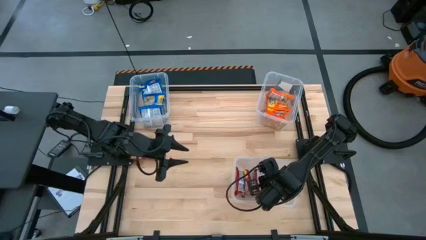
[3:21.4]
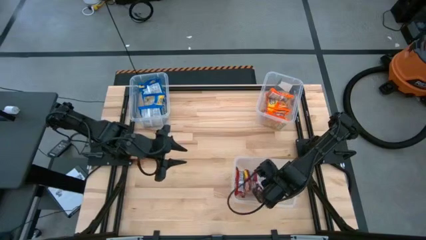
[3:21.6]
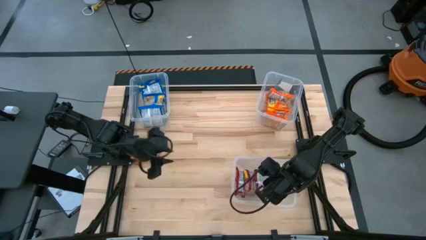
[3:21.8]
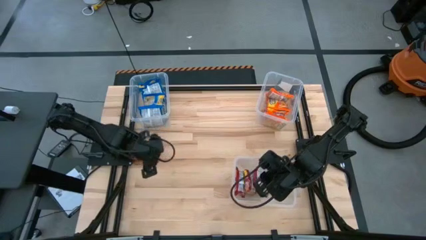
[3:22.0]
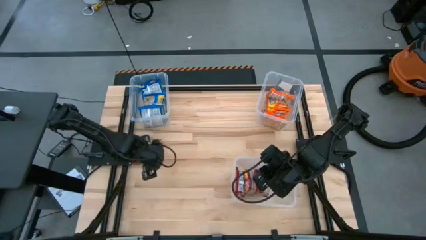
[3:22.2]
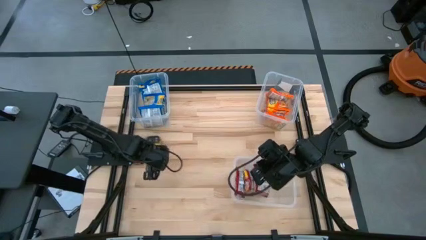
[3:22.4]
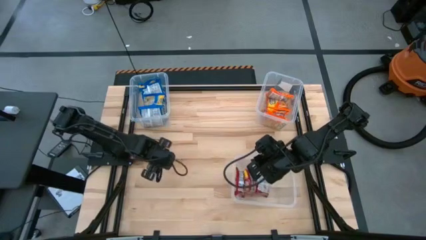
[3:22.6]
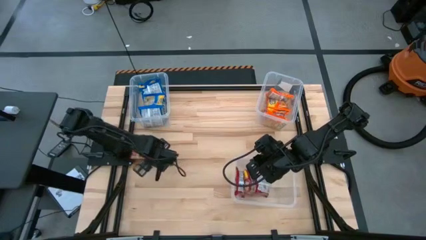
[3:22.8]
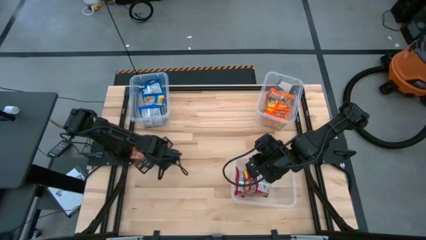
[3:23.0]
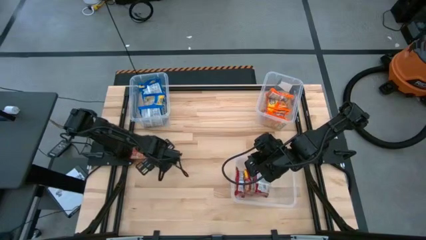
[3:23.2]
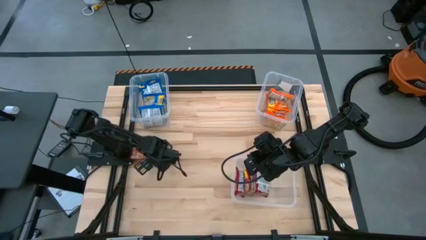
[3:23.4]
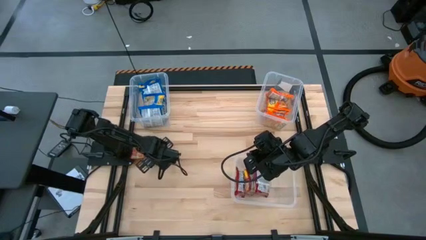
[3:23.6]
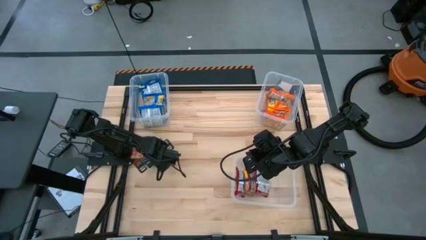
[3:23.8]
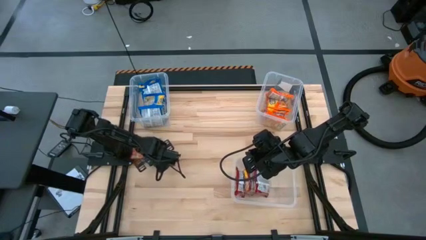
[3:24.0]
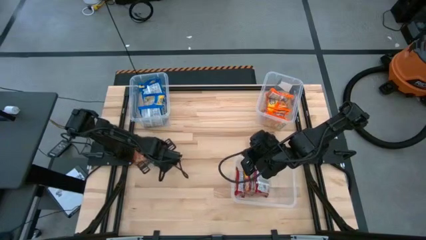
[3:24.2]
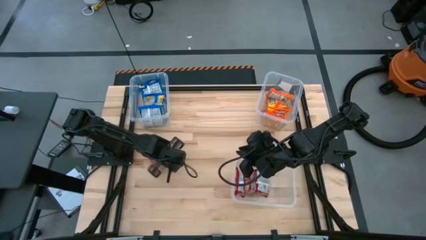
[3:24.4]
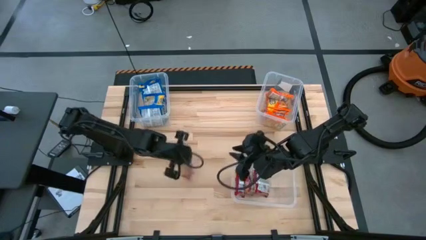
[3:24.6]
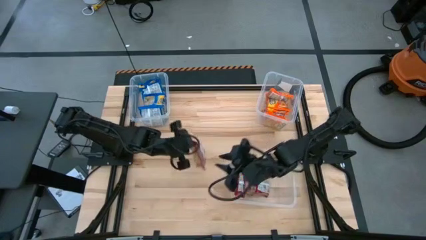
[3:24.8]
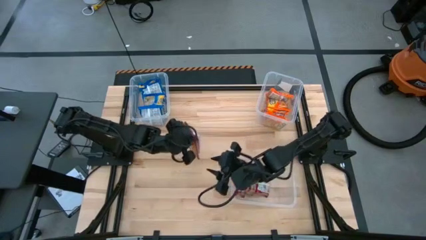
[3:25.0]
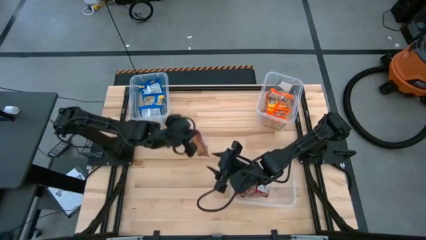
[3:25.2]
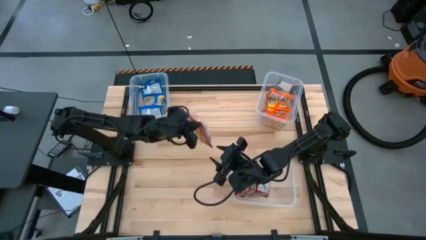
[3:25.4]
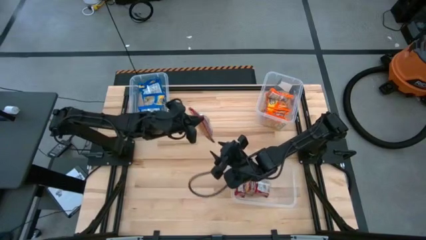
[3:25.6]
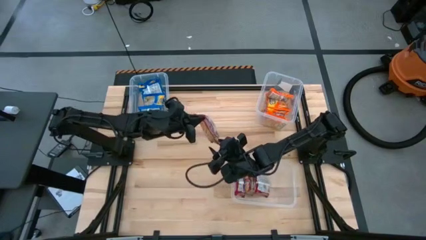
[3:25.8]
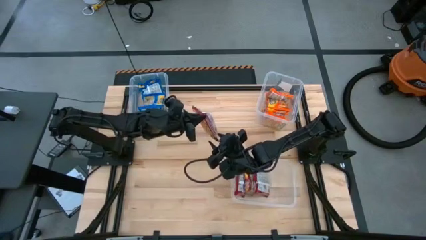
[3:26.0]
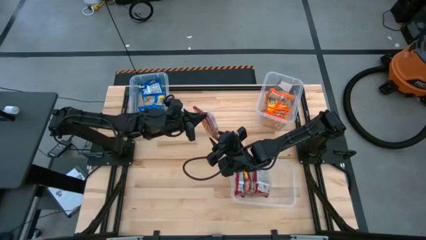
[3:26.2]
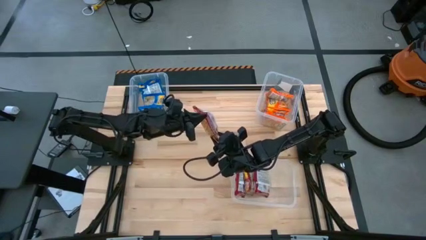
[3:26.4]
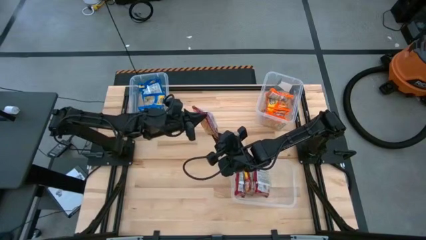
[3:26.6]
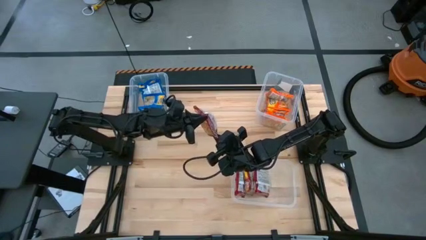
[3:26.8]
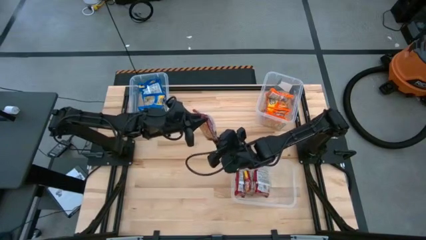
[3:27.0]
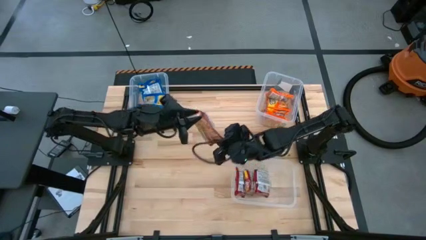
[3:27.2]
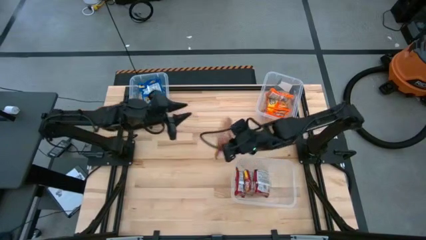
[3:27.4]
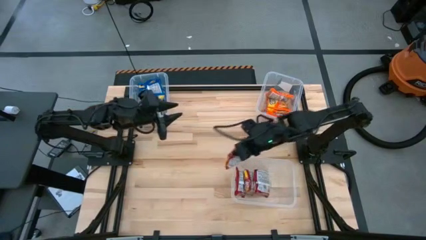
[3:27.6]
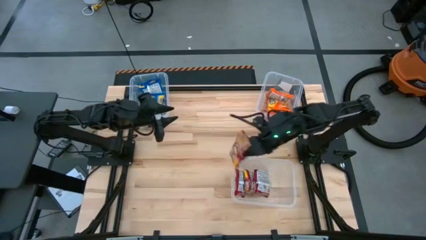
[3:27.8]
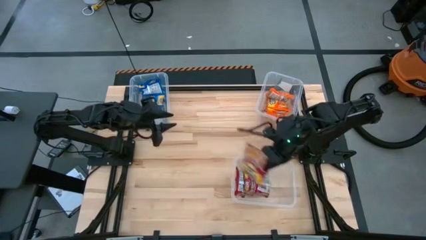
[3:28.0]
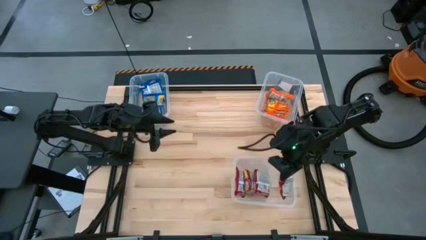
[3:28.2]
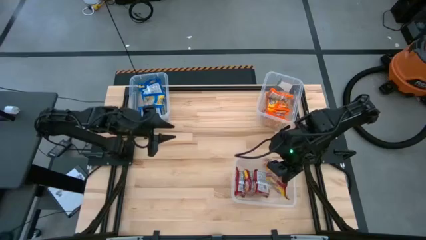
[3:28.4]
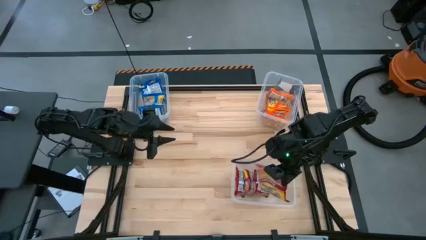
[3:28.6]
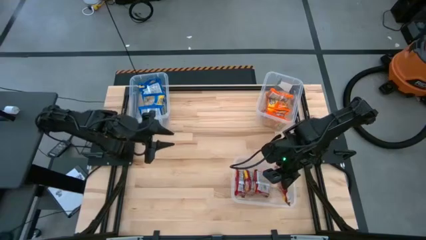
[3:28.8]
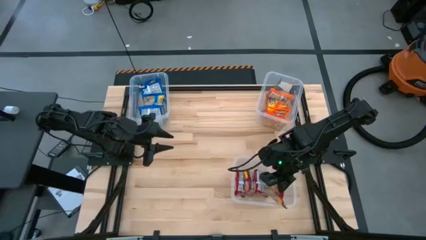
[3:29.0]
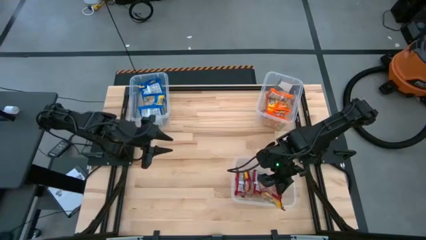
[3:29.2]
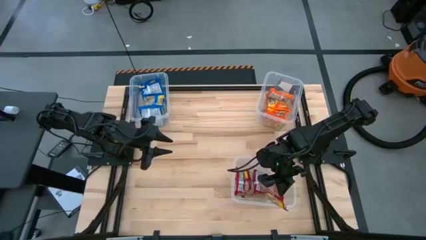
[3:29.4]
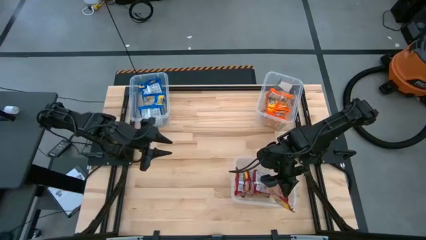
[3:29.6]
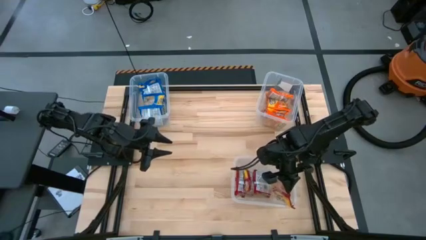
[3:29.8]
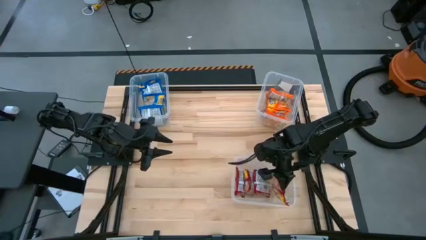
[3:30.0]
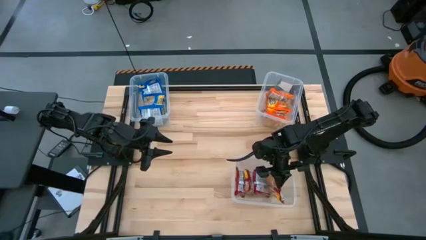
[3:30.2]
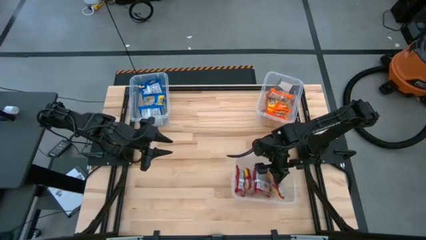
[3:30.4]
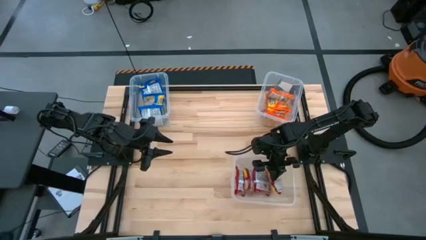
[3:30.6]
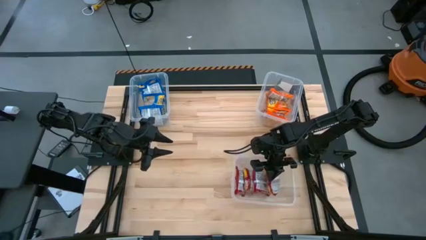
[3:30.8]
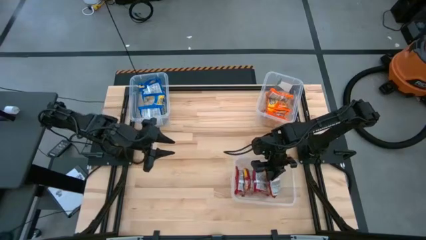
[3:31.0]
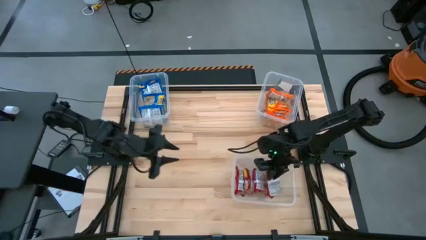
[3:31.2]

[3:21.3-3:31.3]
Task: Sort Maruchan noodles
Put the red noodle pack into the bottom transparent bin

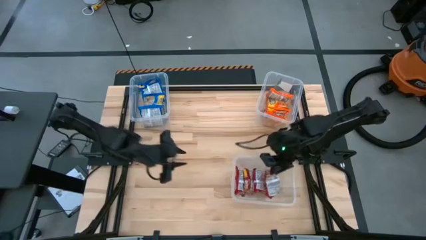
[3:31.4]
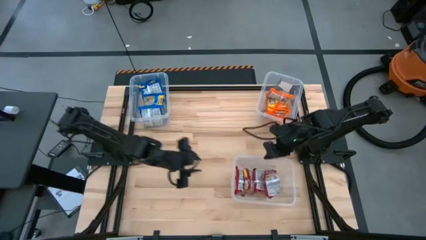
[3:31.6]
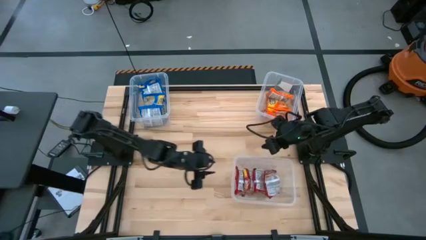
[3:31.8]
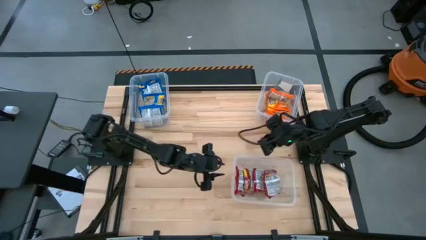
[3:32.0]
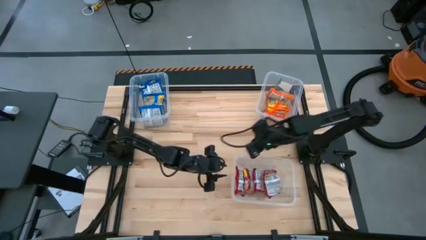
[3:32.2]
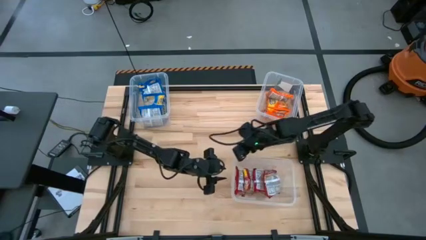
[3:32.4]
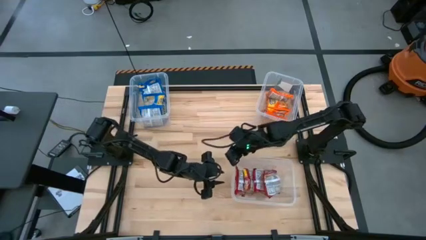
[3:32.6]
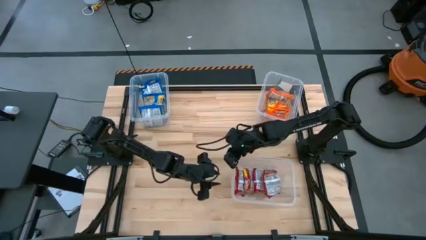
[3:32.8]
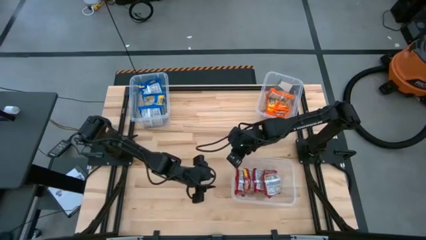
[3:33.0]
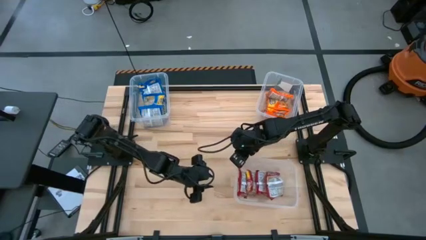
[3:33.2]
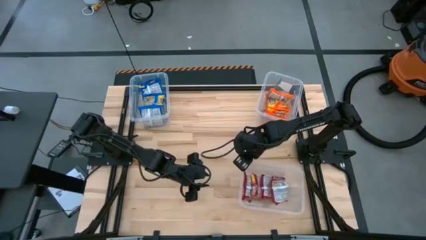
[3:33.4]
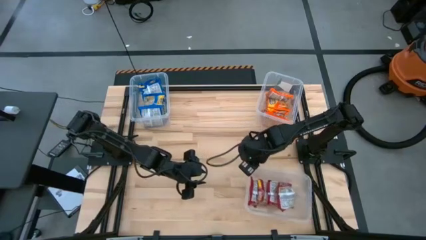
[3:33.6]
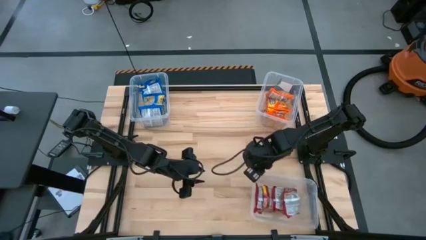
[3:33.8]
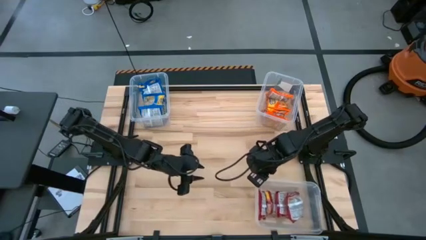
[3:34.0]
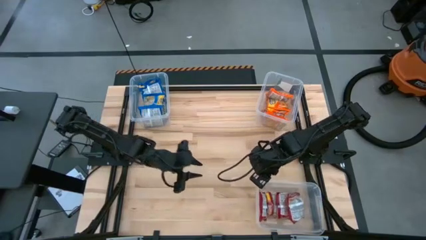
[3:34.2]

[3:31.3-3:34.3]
Adjust the bottom transparent bin
